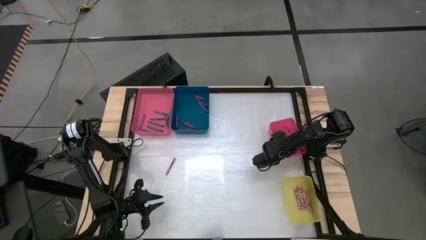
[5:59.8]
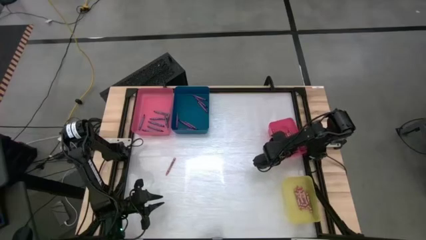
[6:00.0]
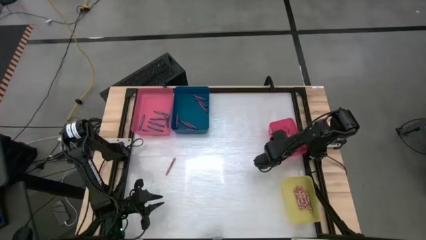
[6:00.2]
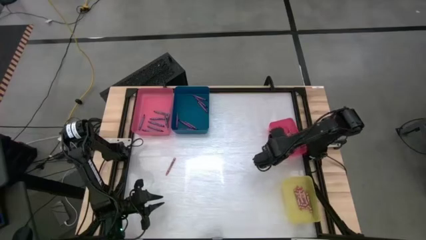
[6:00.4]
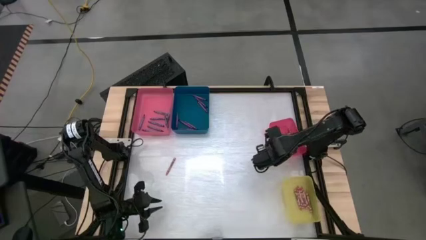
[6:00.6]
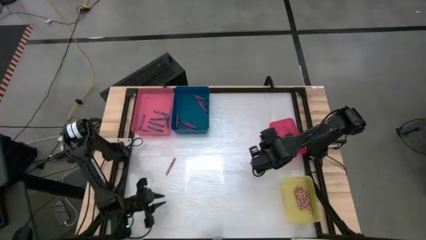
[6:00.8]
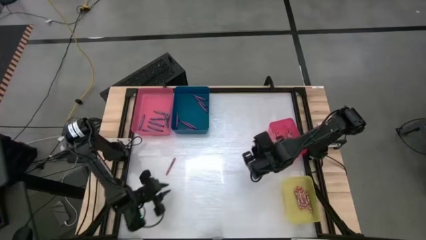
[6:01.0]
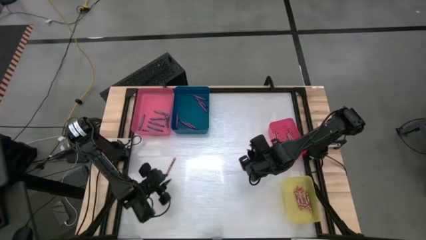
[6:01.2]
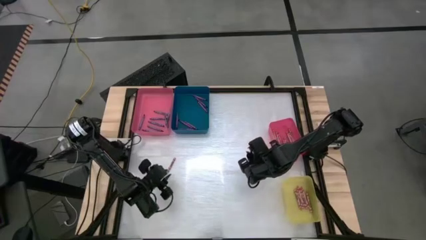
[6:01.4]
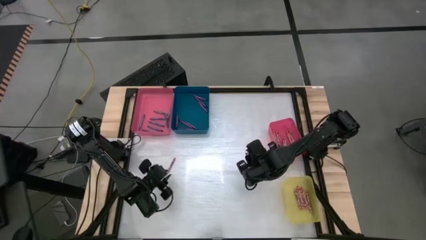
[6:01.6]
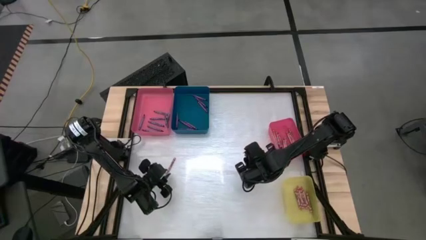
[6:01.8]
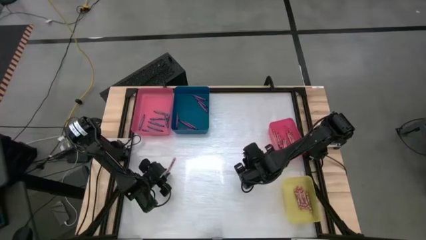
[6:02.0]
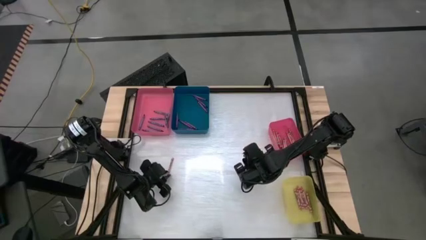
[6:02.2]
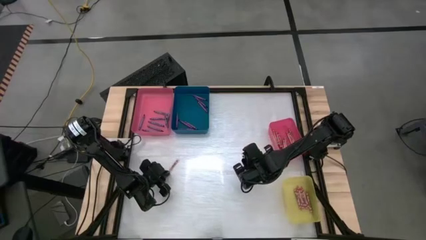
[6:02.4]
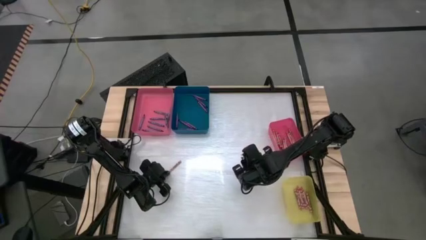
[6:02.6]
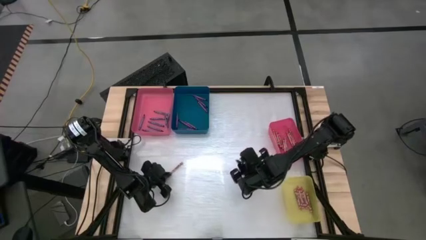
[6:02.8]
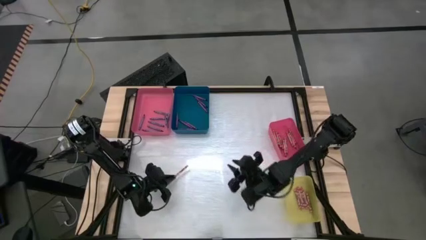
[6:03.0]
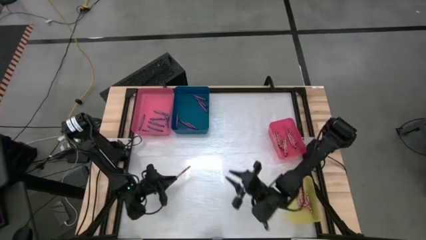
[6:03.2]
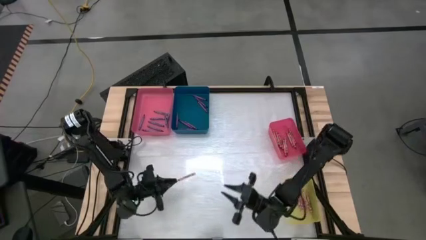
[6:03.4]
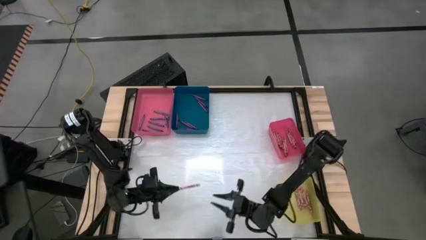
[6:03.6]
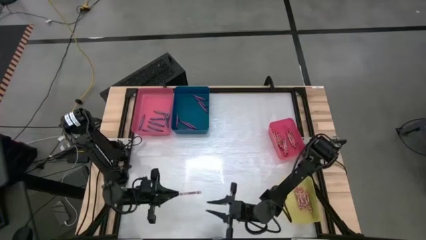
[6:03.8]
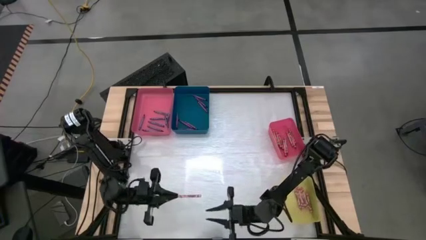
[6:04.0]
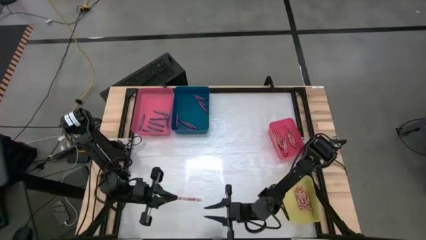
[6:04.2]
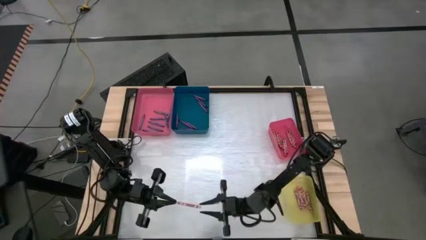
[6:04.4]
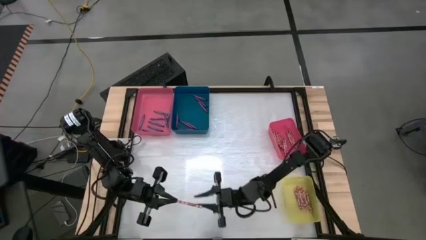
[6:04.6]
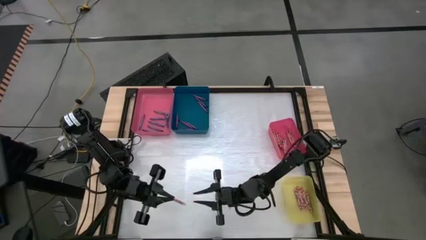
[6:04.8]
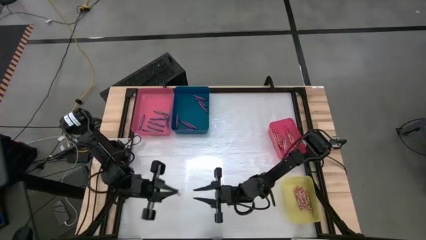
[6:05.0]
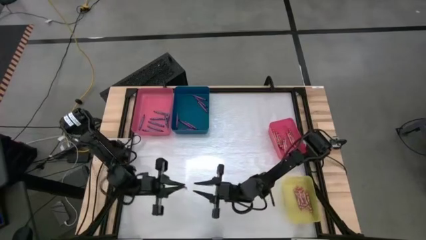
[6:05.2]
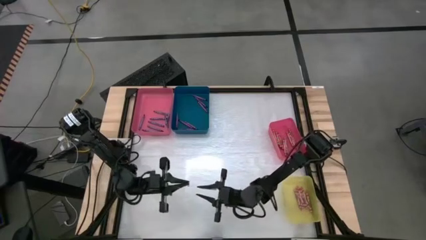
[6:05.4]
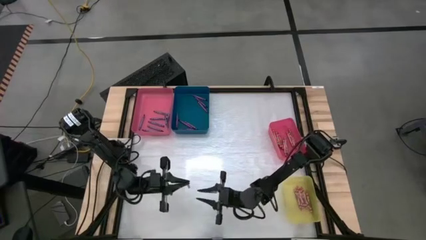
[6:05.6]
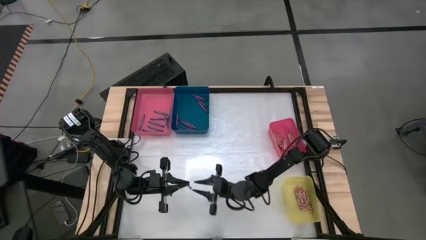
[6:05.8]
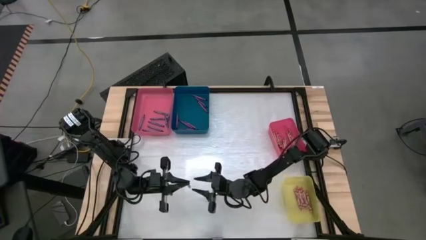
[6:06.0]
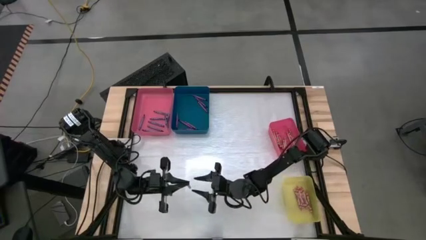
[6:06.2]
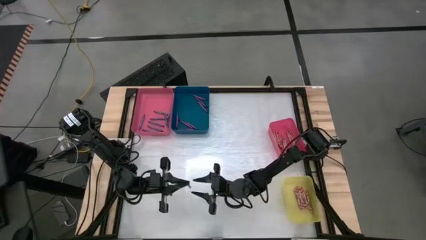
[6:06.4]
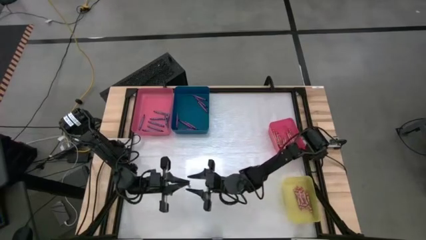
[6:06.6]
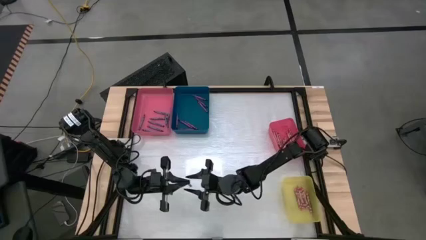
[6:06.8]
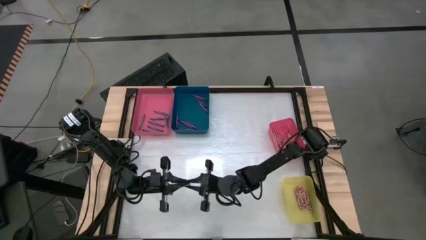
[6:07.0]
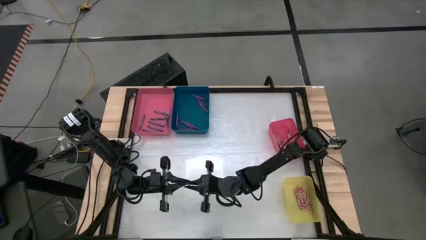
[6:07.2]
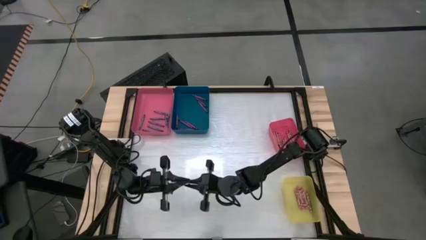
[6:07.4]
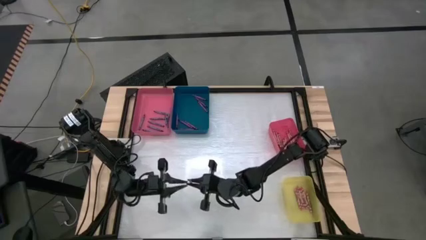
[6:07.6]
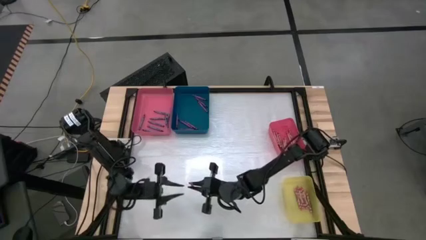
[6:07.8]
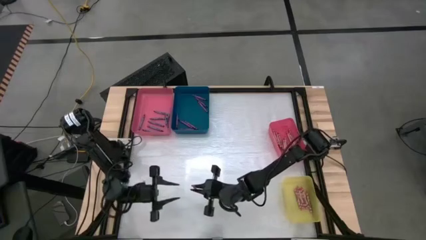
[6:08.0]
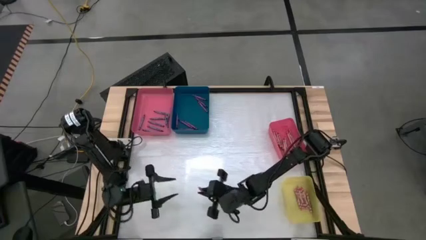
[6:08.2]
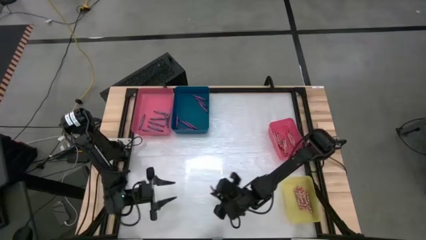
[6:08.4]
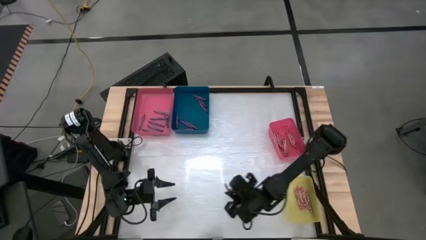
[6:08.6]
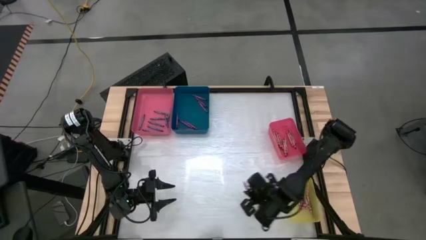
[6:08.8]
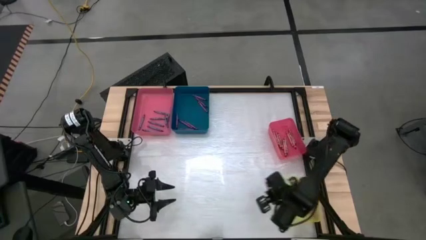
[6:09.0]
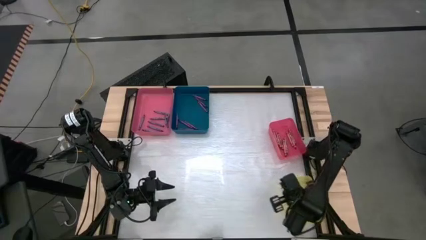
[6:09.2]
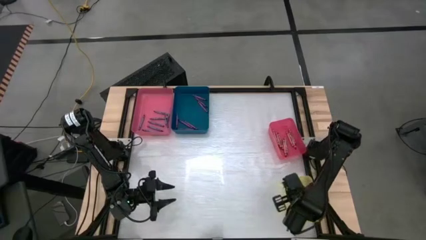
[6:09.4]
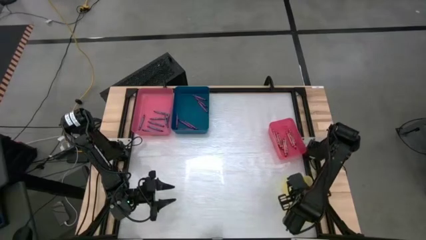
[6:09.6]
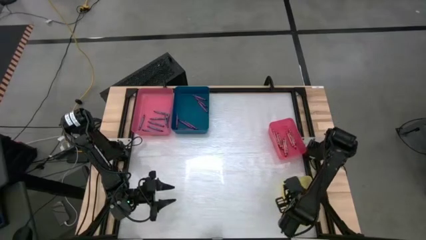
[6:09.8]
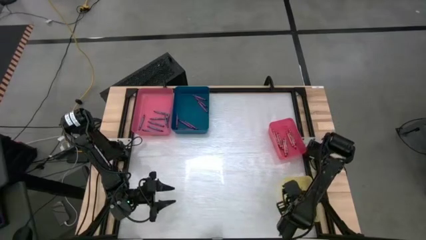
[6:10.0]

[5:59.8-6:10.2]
Task: Sort crayons
Put the pink crayon into the yellow bin
